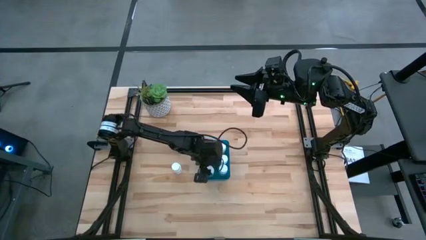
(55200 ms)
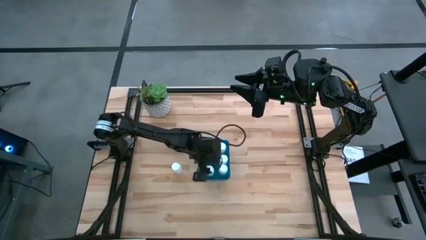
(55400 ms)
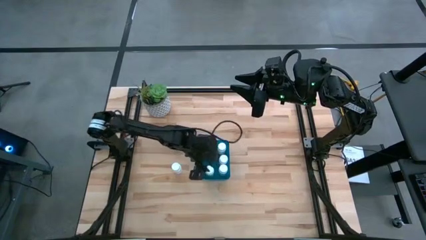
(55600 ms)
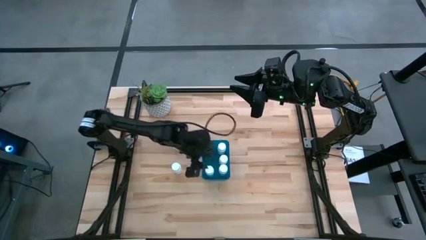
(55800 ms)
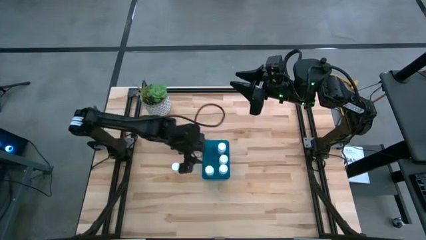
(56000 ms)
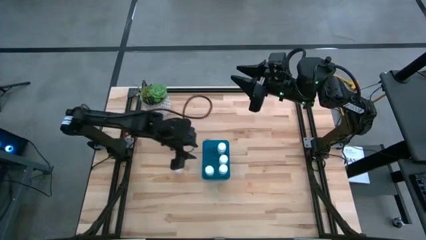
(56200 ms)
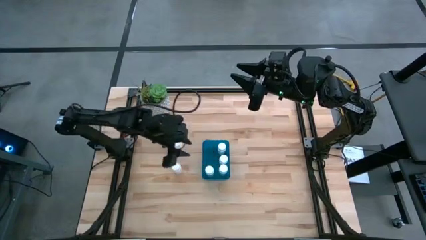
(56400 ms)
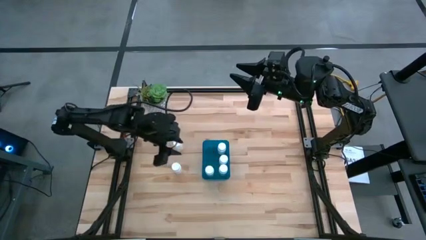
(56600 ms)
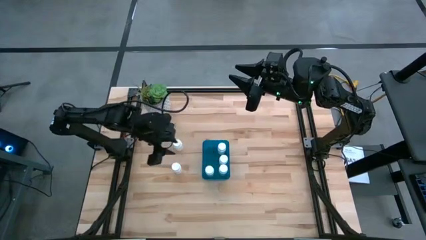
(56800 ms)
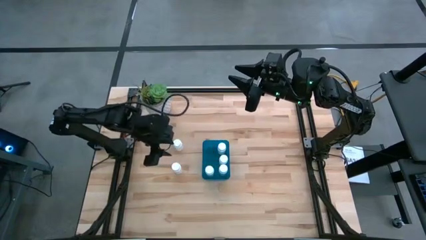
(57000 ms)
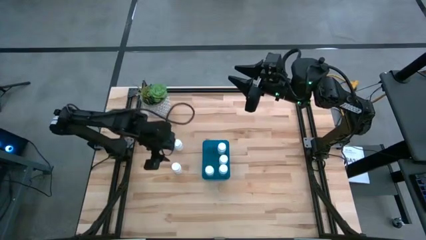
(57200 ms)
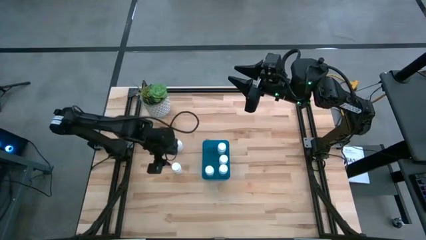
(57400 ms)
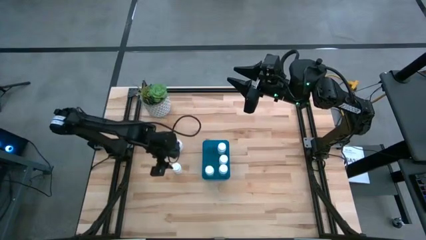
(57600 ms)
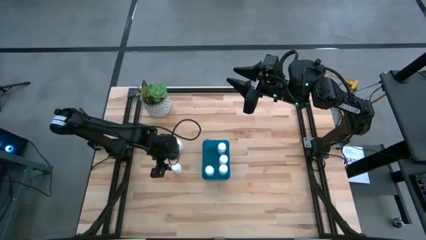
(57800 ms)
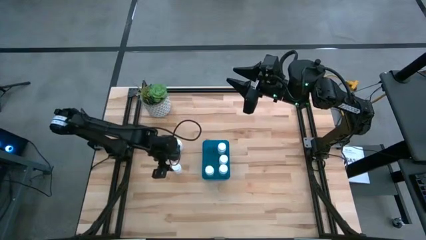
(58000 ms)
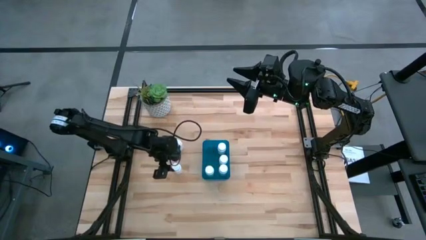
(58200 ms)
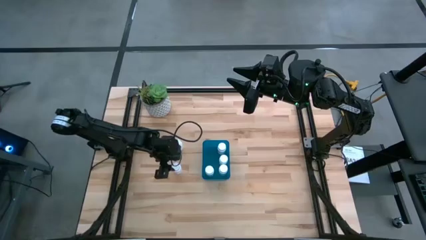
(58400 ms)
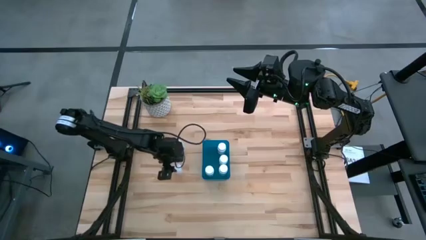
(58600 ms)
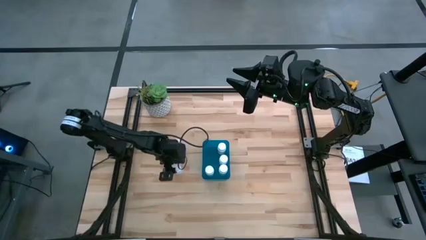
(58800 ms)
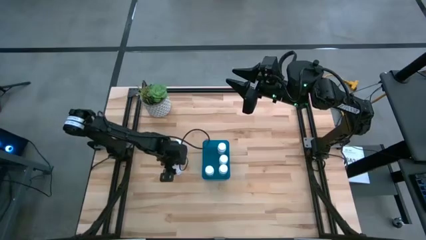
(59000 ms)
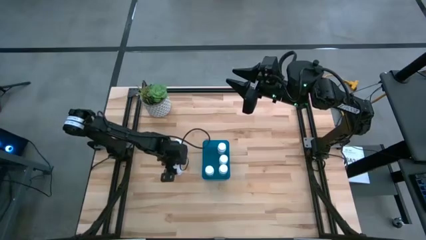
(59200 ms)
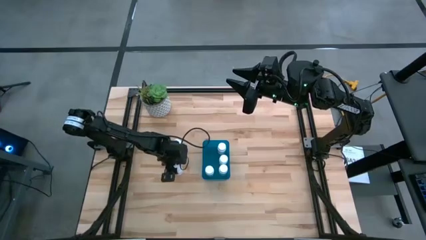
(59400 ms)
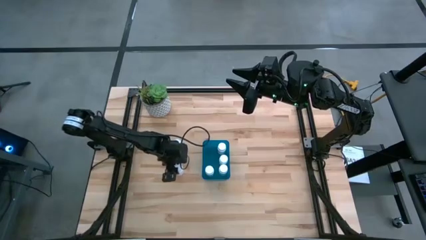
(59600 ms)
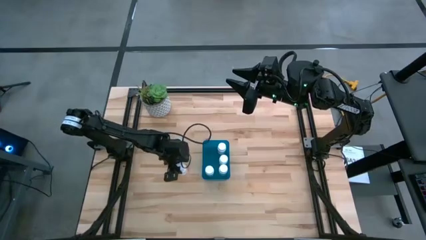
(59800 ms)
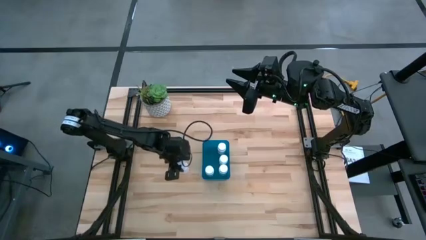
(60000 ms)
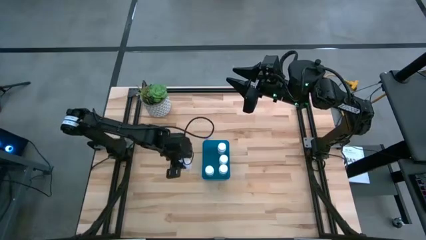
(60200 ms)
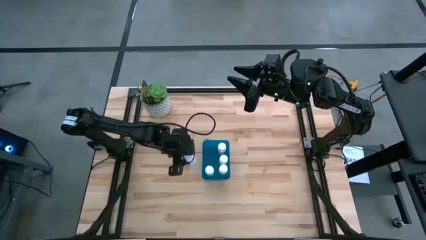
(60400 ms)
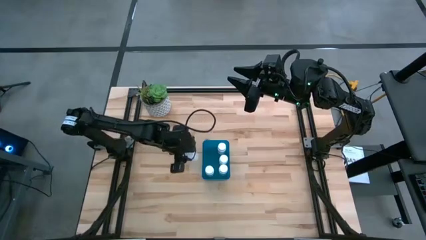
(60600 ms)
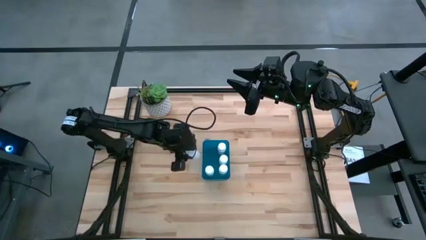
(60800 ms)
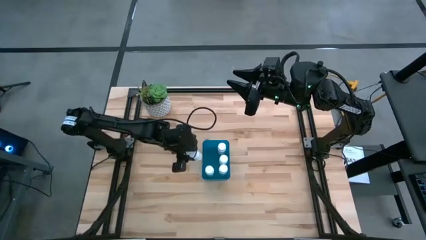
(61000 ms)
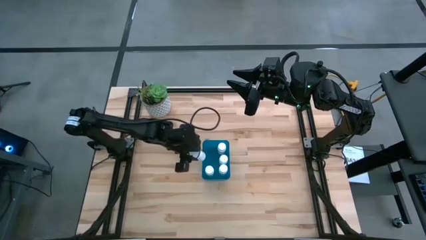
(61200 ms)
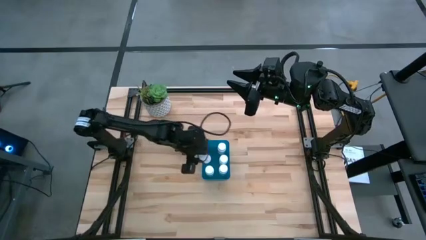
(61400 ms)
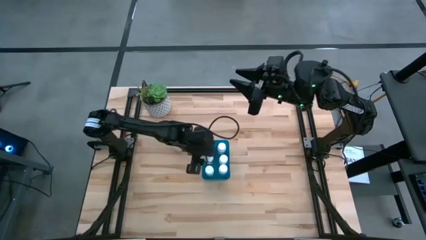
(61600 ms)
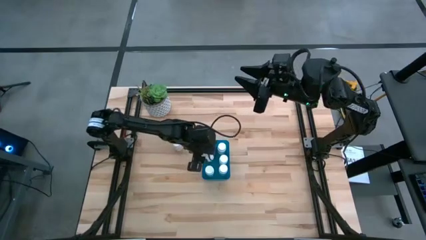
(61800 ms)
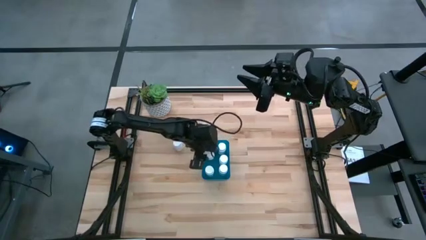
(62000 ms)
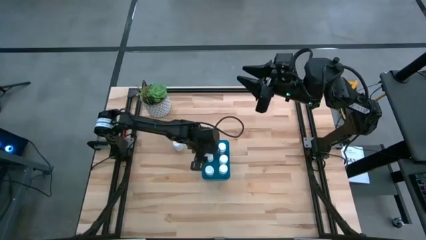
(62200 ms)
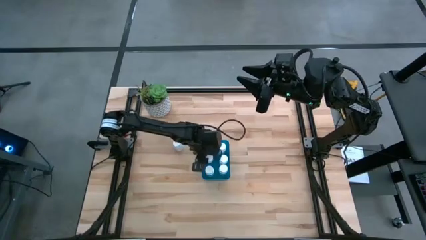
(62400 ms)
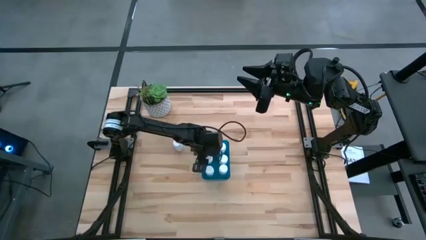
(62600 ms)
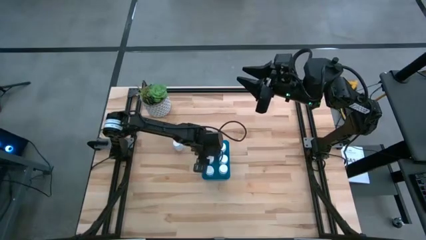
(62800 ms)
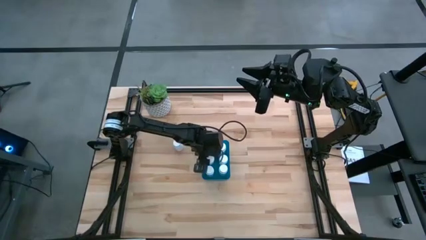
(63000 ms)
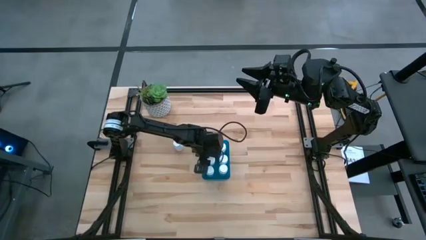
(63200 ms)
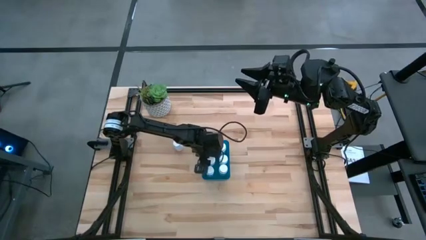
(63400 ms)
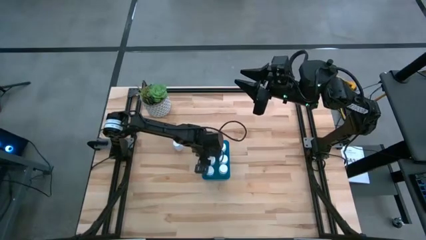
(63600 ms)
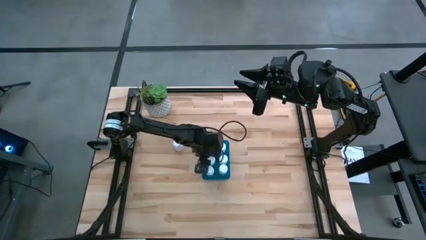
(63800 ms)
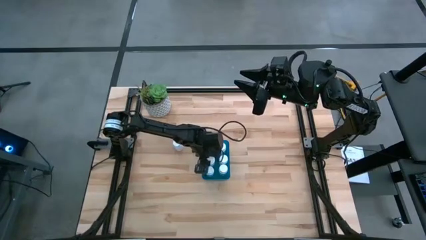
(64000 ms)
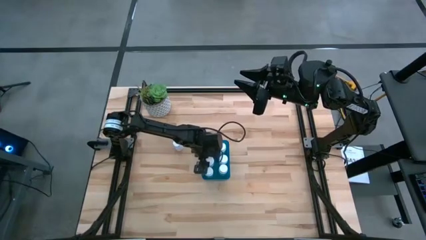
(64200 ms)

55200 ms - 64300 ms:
Task: Pick and place pill bottles into a basket
Put the white medicine bottle into the blue bin

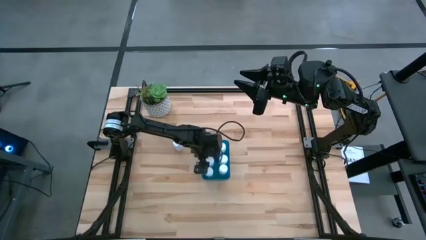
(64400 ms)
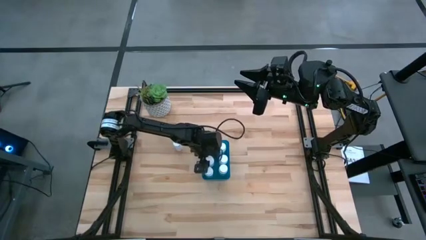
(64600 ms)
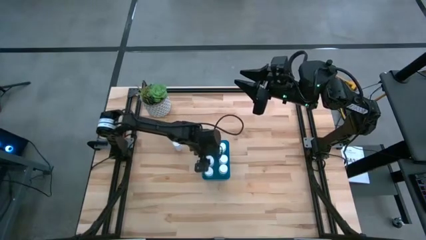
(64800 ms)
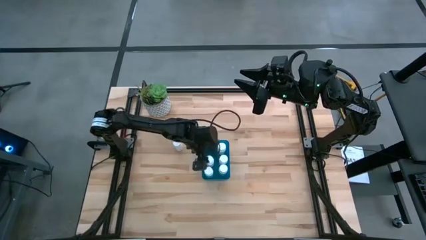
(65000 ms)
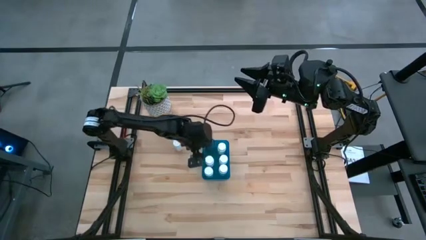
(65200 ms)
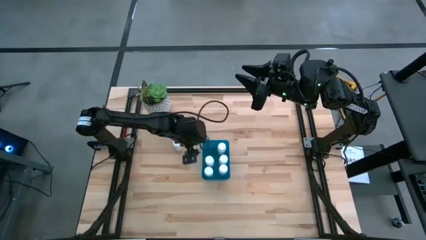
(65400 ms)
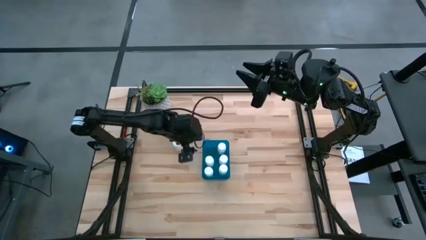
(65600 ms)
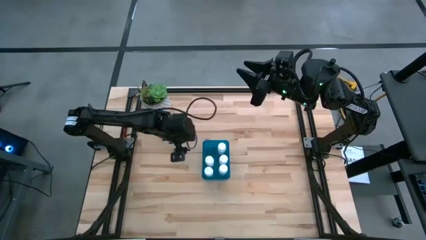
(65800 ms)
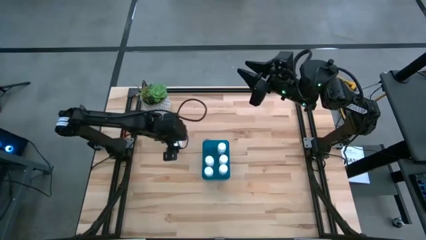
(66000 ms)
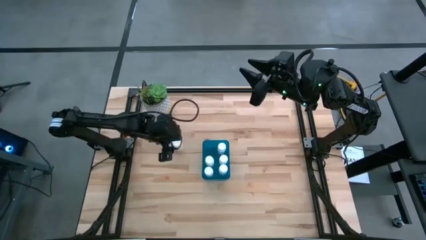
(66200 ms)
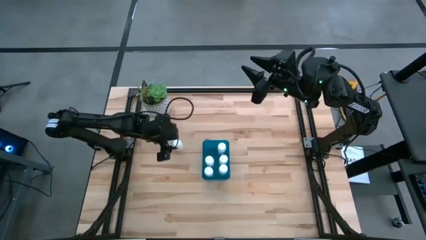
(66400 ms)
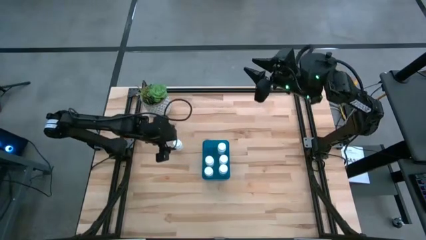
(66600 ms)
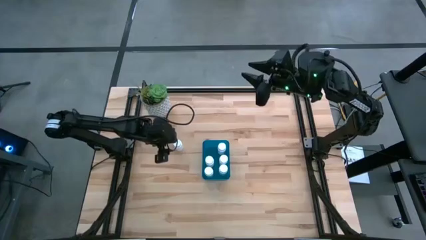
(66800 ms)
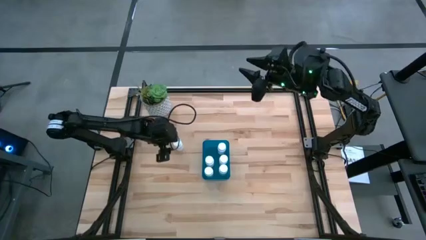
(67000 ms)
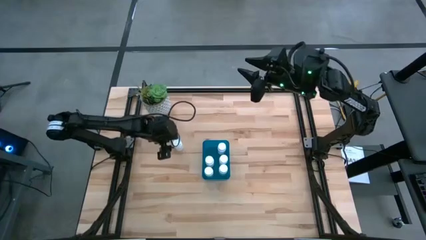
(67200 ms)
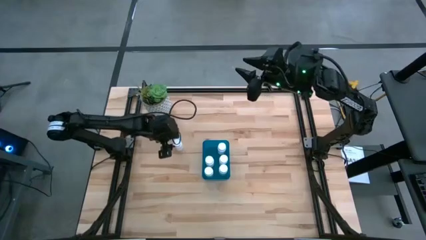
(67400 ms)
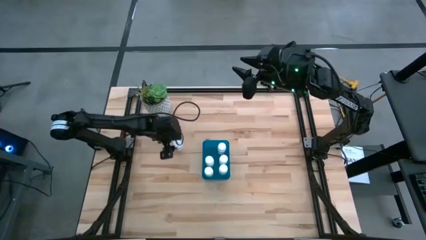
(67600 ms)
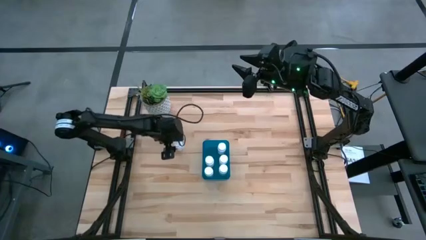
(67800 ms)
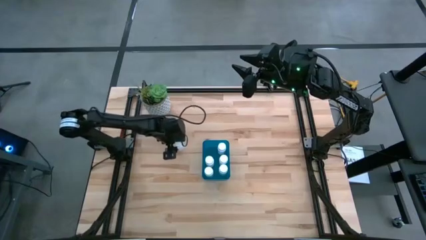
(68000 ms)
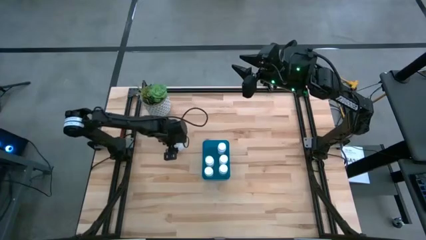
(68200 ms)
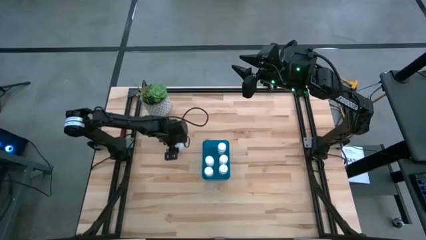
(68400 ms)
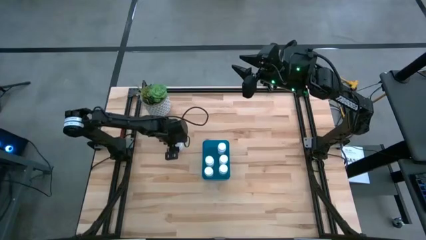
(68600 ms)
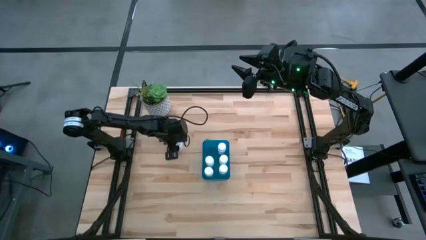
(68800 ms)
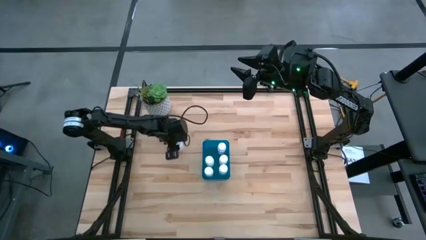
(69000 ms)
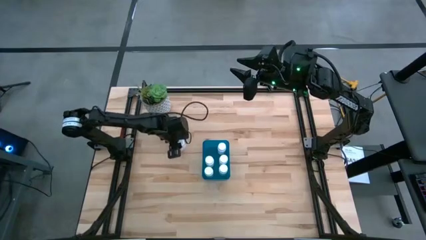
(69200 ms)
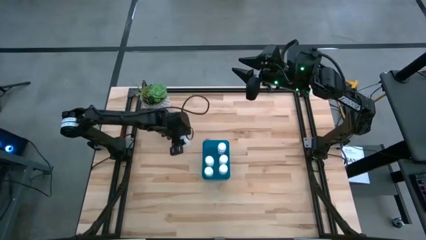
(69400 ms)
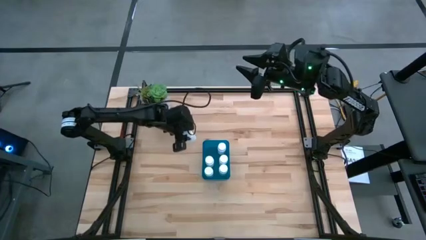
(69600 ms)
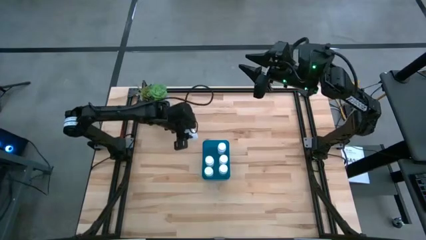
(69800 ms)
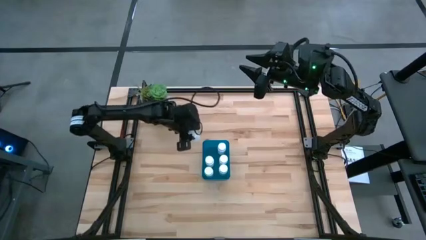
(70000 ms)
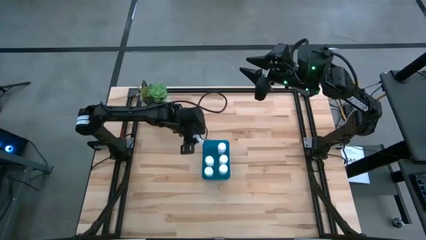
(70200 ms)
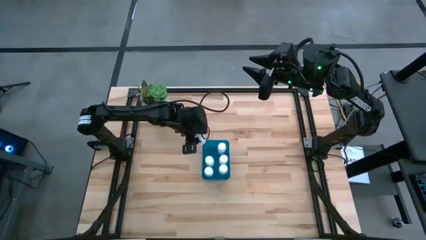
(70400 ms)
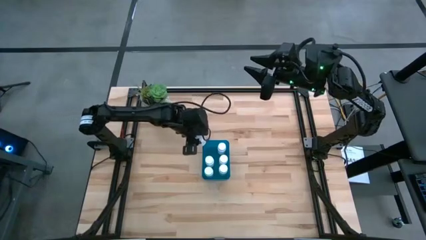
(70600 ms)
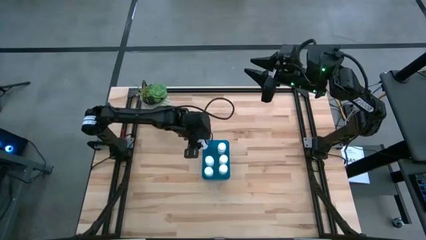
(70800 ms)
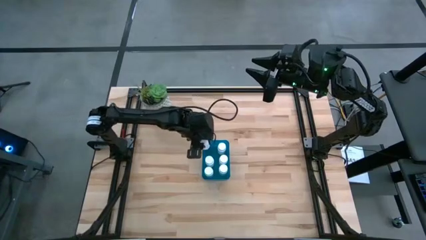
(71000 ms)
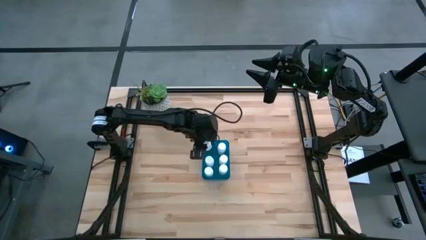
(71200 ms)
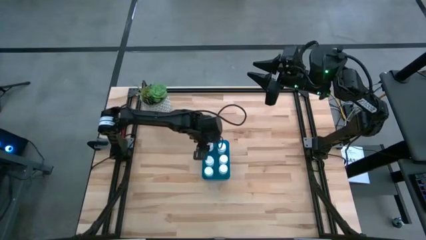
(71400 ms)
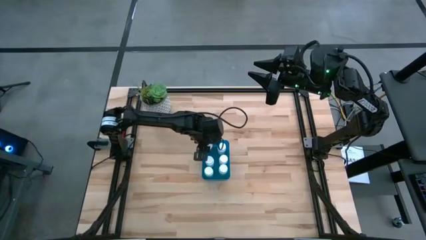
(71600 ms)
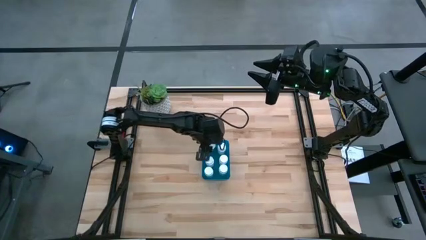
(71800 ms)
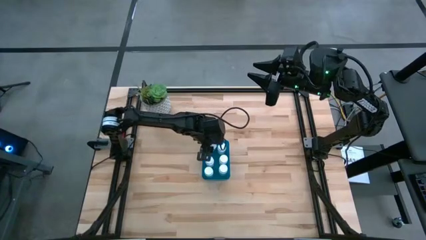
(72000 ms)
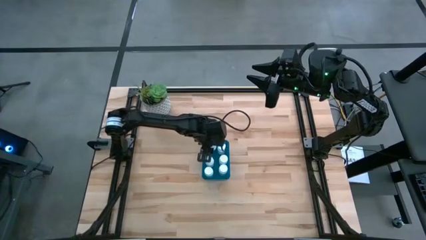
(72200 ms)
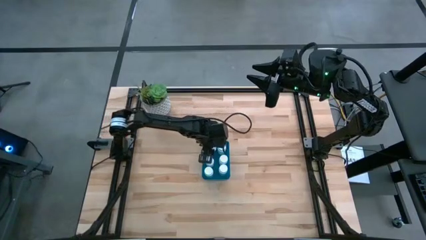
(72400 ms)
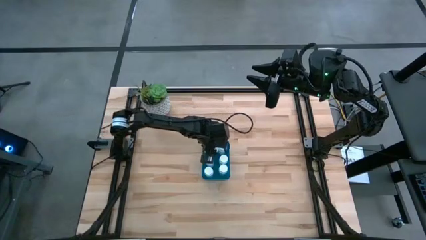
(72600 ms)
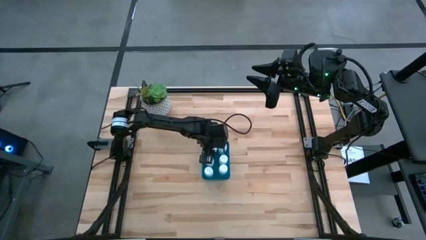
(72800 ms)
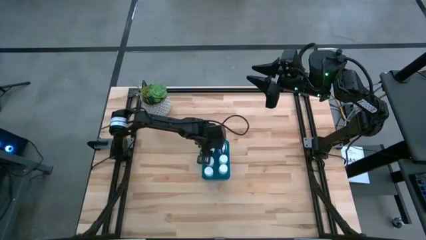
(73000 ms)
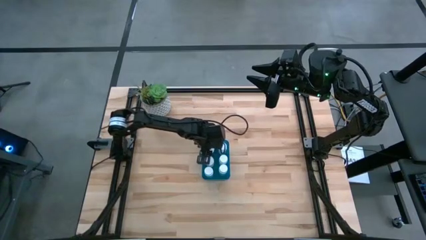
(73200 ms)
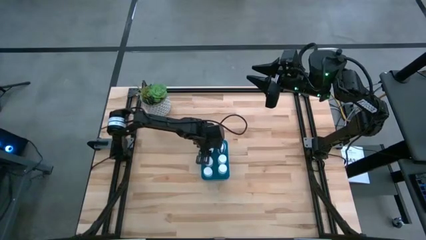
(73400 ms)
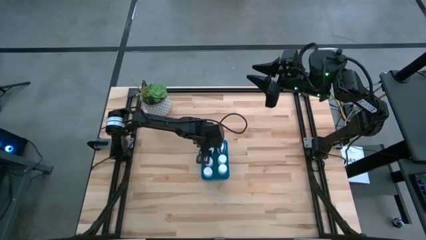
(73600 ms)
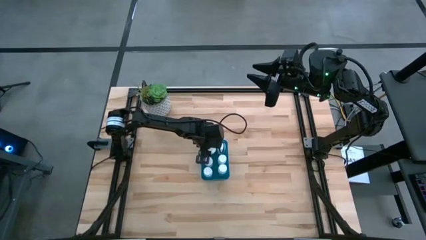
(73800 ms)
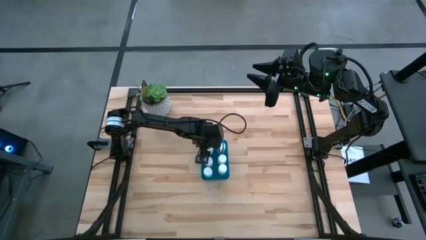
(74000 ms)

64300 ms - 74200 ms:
Put the white medicine bottle into the blue bin
